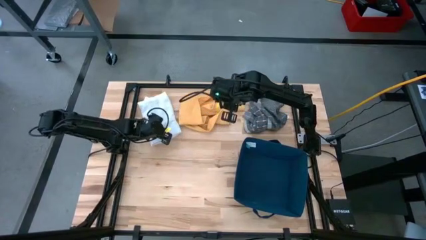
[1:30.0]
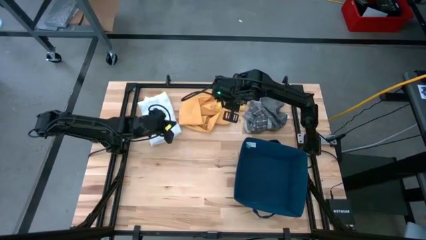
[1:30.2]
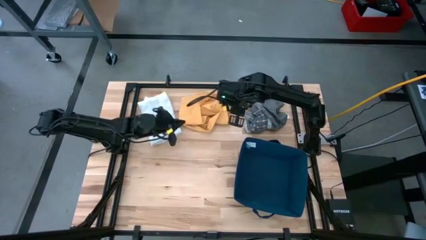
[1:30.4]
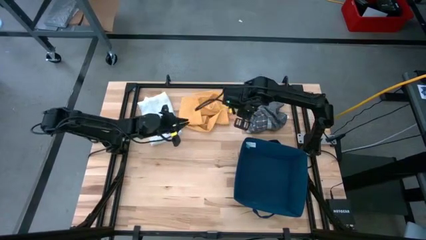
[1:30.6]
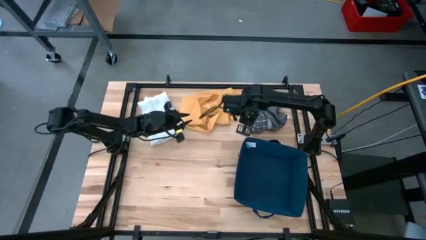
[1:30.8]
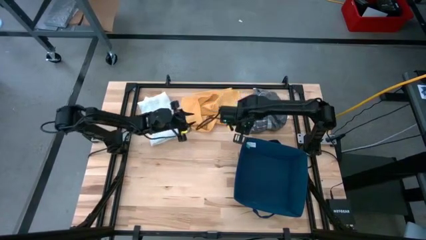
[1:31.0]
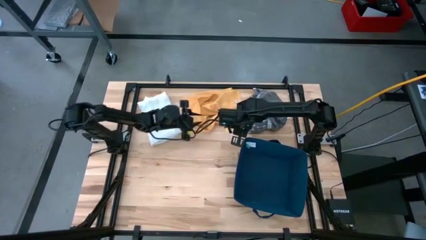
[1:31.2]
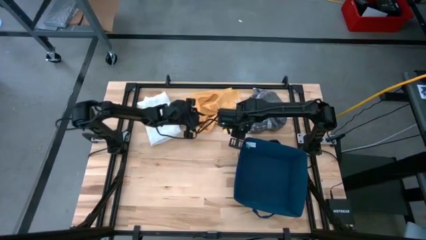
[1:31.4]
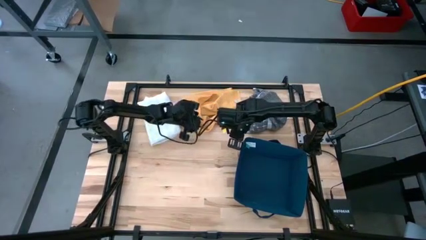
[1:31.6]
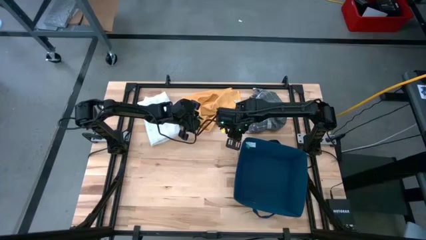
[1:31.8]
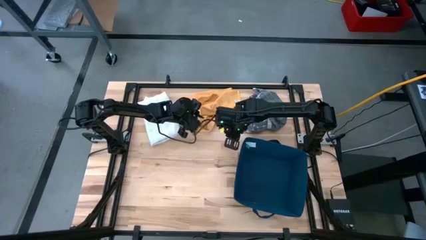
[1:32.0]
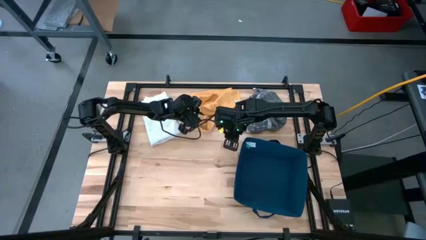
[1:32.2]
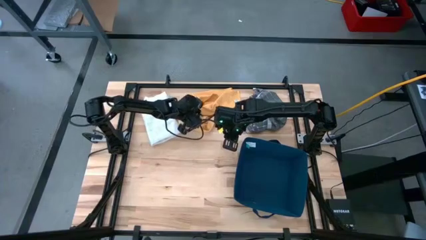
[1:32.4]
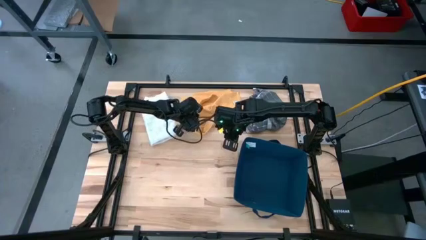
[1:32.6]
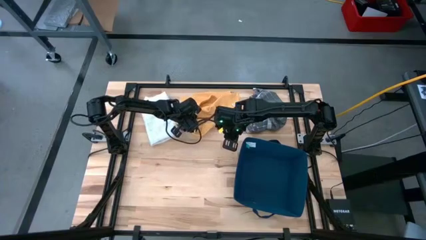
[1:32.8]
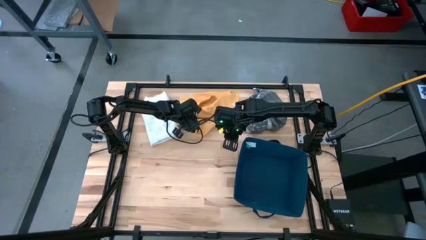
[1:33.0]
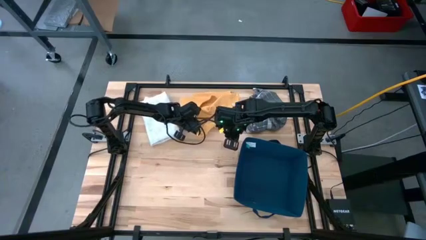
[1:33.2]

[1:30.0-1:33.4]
Task: Fold towel
Fold the yellow towel

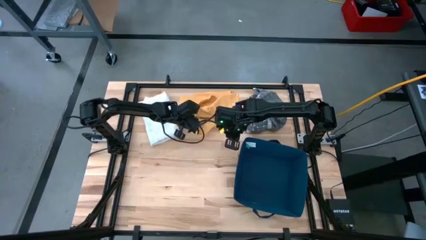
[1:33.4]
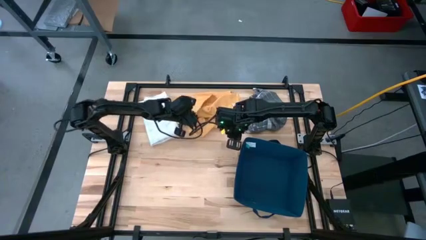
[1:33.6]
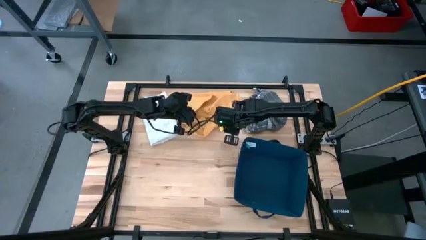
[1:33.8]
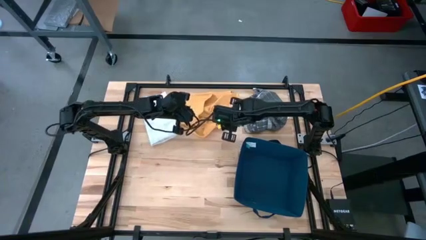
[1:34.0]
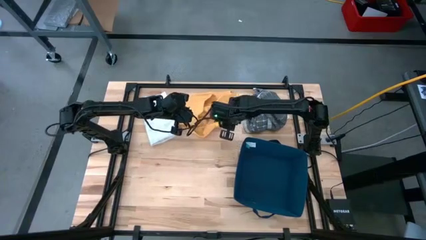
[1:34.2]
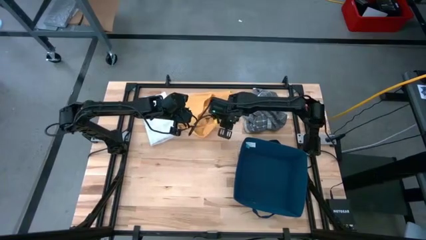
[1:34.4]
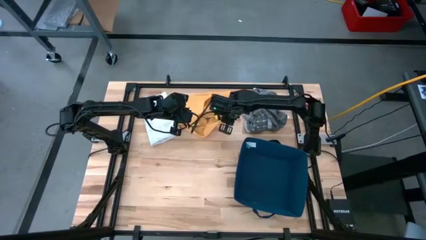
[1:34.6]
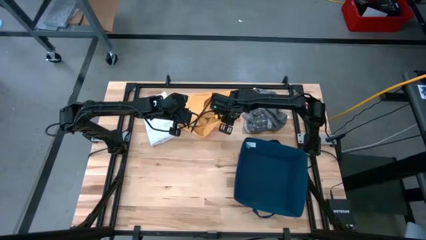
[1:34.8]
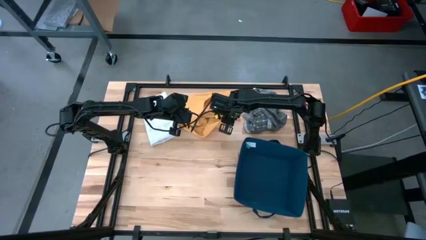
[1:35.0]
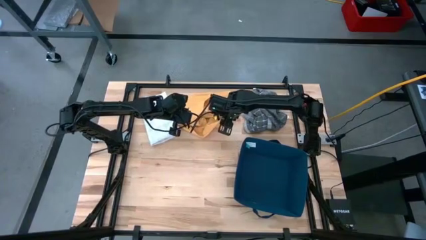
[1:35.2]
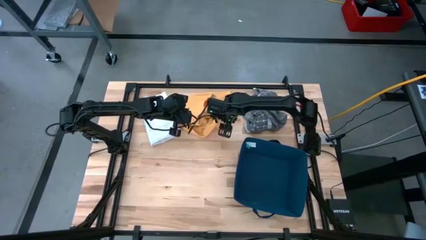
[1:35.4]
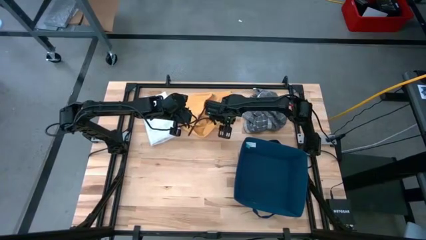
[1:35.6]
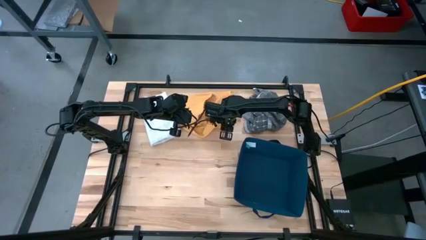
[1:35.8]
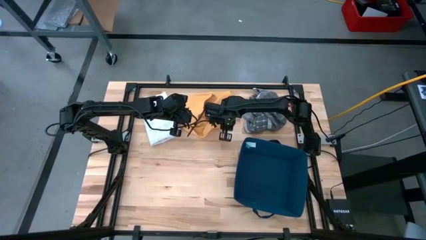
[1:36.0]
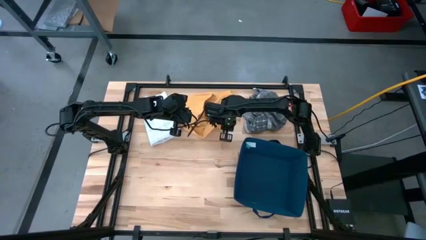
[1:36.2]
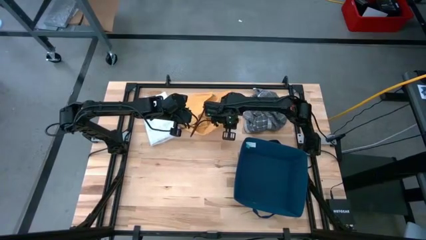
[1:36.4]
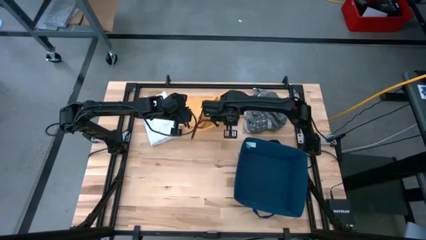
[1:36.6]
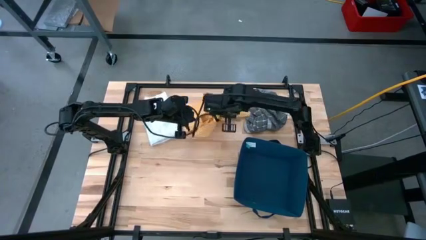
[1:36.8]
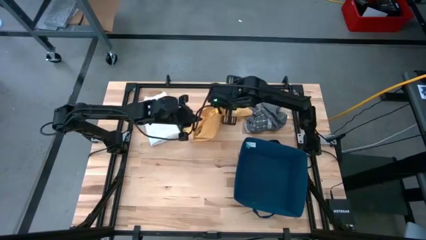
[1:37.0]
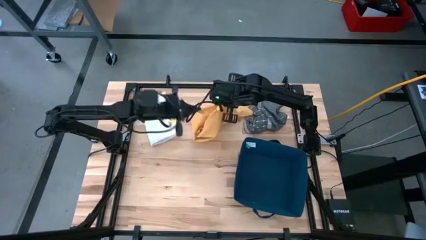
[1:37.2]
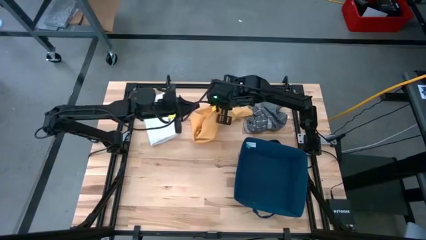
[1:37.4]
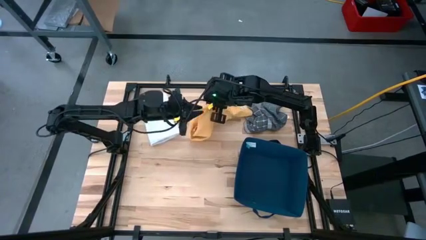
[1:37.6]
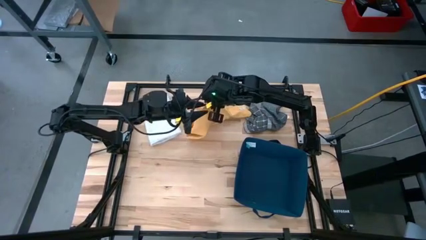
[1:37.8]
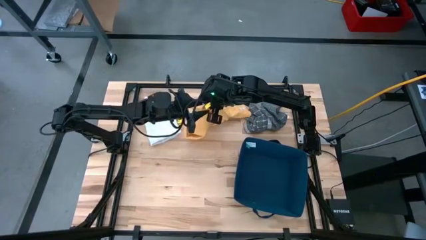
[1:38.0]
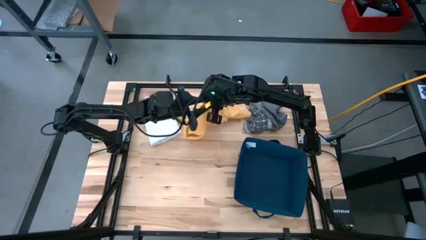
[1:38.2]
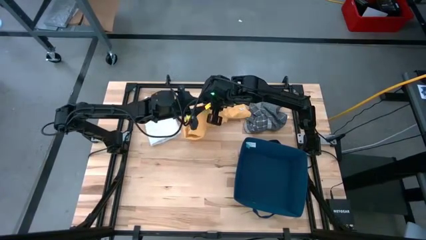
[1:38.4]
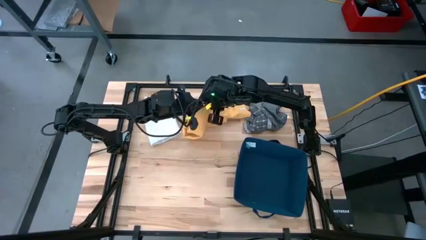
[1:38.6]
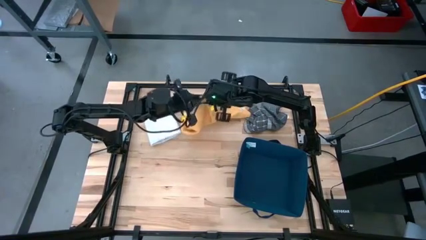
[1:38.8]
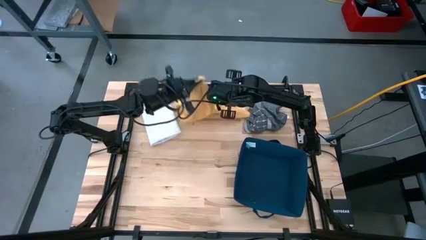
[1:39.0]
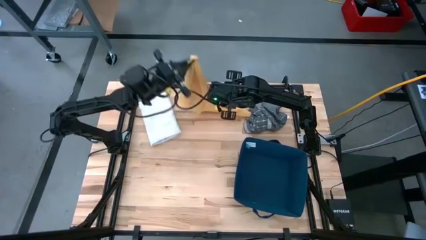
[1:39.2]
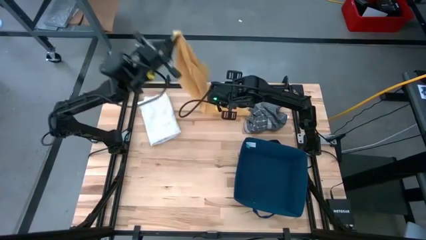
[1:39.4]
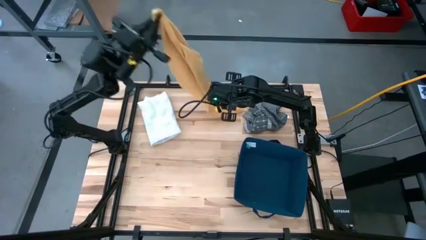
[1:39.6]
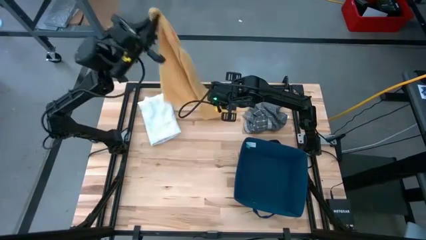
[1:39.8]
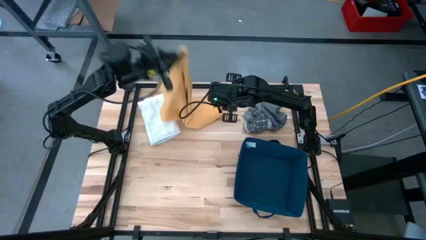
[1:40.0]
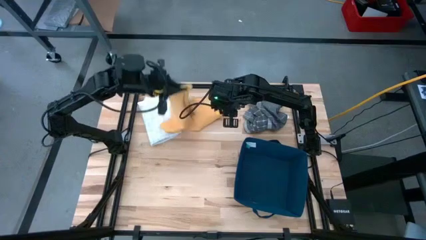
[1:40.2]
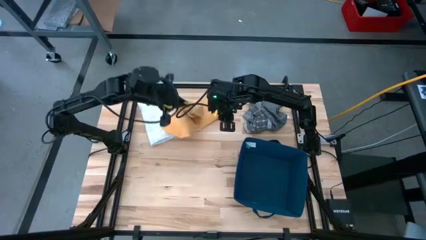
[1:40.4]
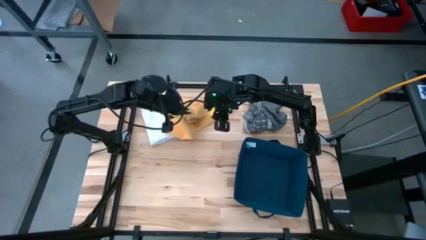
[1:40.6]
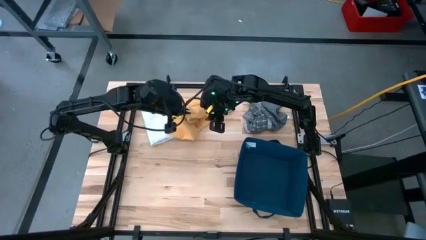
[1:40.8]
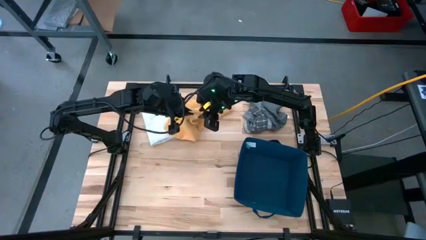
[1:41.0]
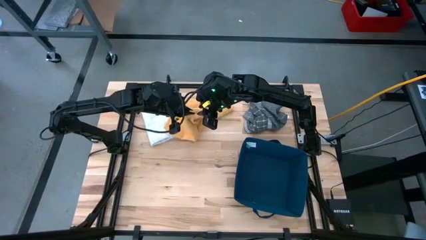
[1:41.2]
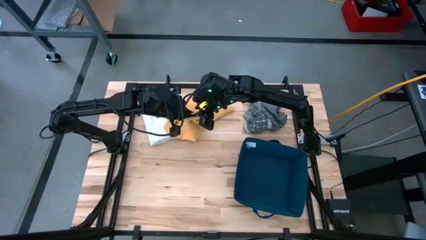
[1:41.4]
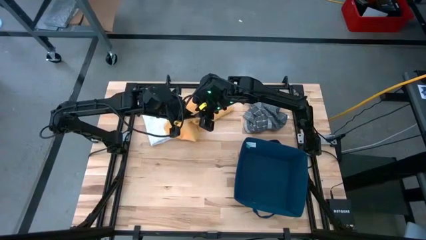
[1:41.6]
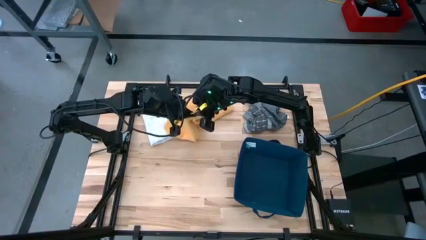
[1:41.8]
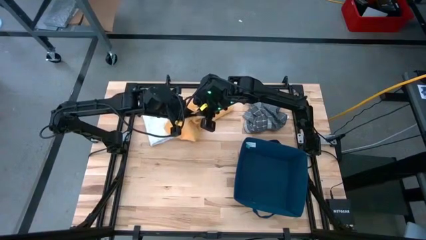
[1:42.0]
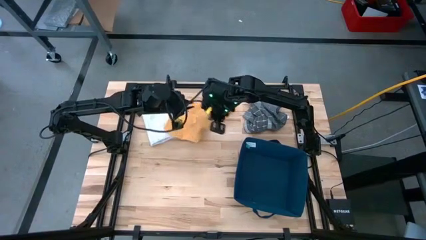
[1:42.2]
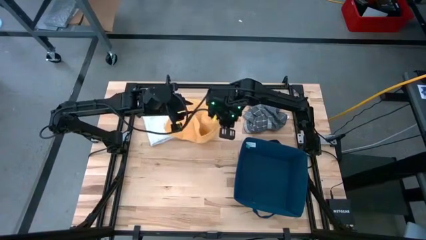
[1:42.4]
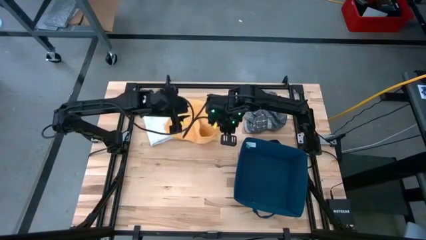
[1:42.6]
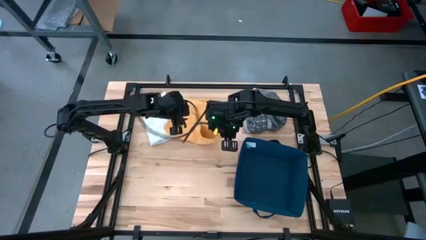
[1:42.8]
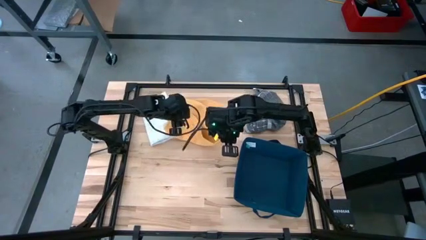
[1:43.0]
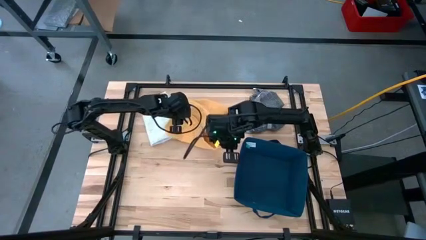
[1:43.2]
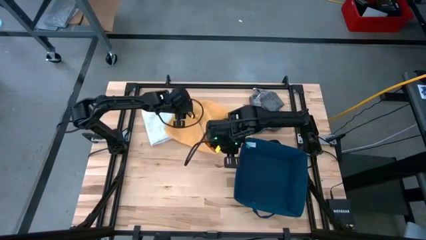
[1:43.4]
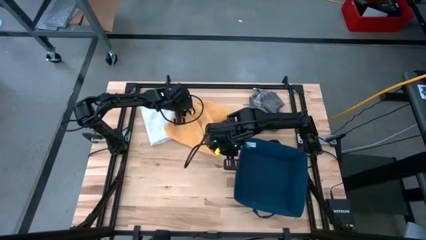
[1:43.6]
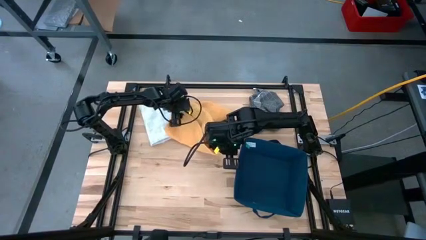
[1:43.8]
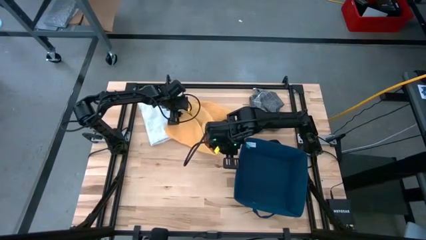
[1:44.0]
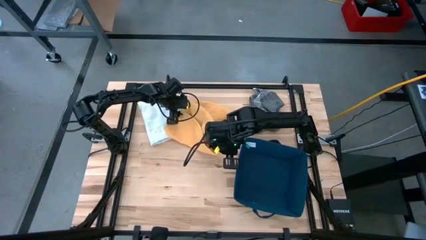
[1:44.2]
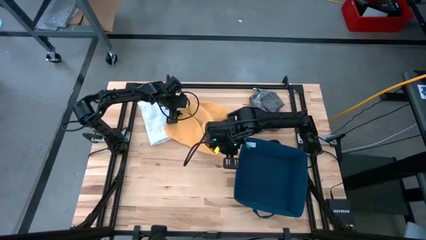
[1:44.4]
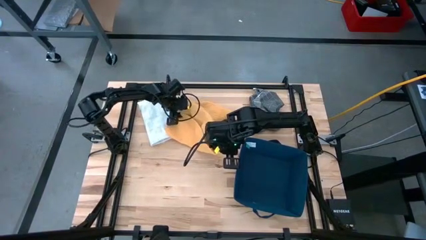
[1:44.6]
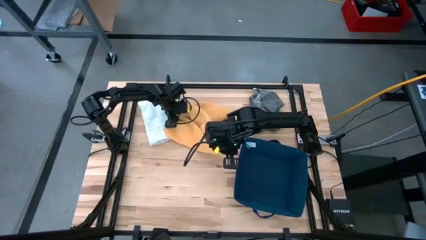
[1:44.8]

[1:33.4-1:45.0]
Fold the yellow towel

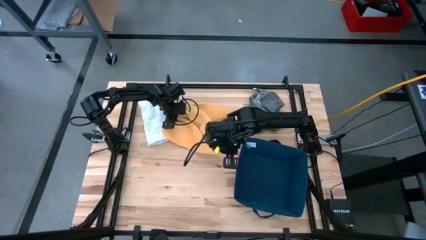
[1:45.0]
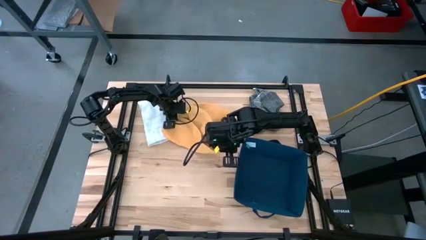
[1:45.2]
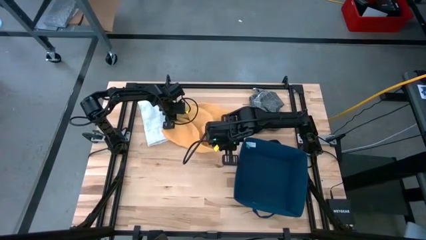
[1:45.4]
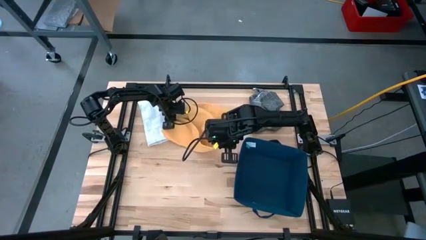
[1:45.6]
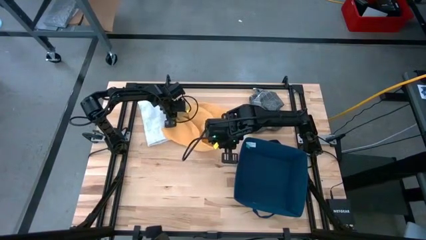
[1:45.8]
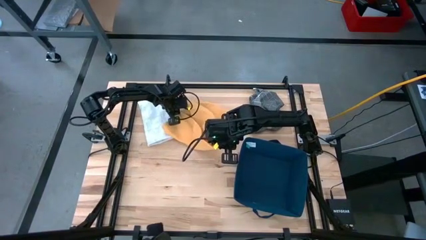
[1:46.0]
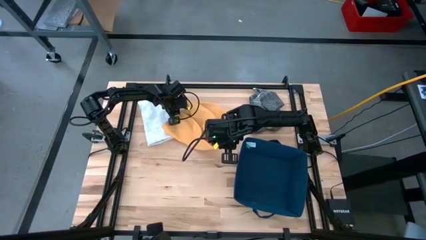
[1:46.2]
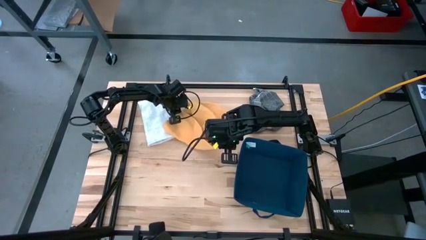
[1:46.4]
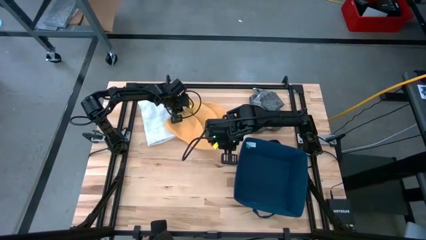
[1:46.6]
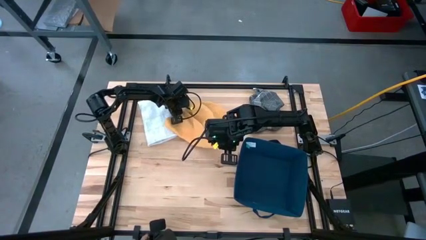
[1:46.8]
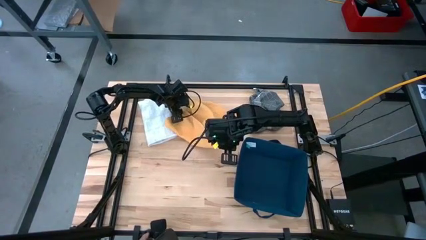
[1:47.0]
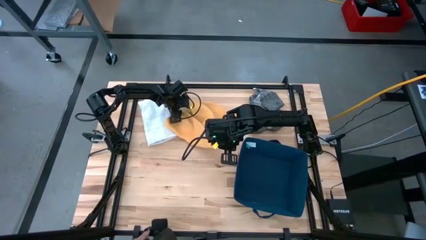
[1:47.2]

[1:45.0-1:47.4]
Fold the yellow towel
